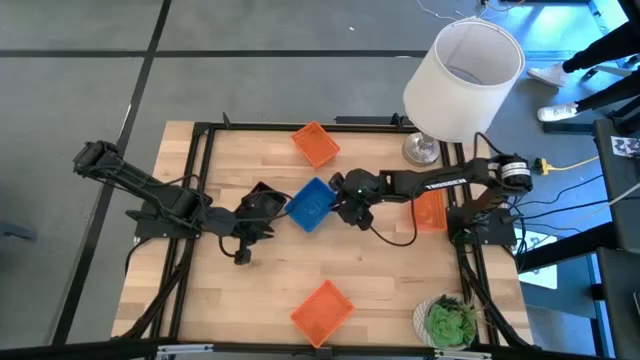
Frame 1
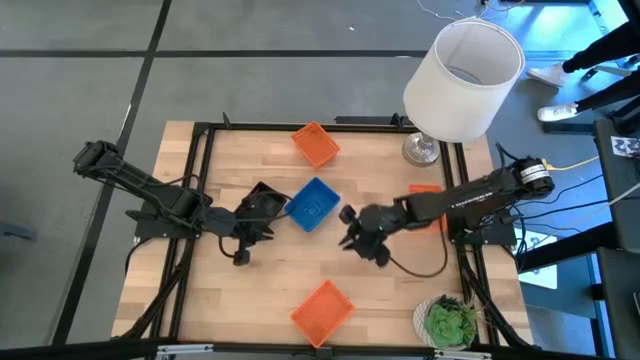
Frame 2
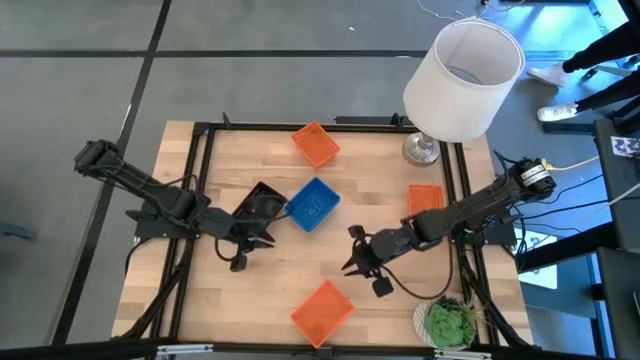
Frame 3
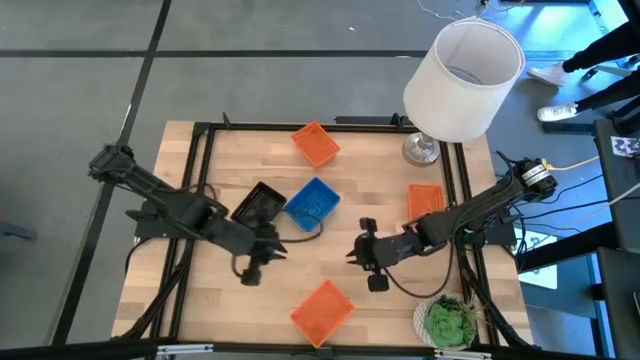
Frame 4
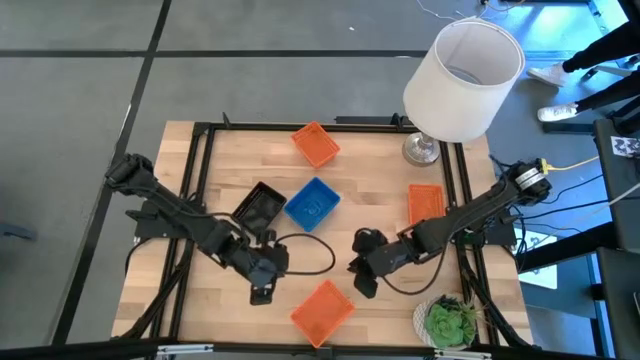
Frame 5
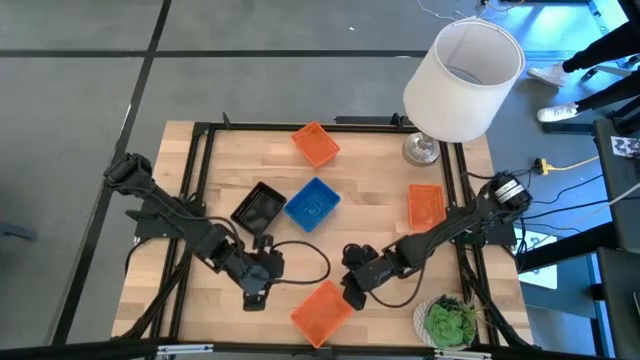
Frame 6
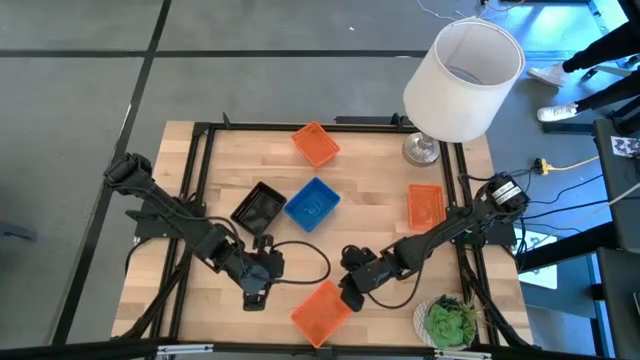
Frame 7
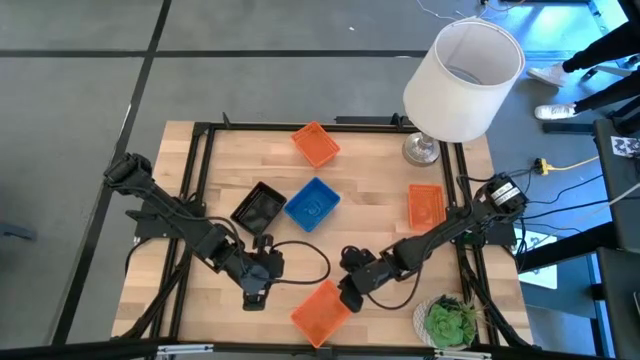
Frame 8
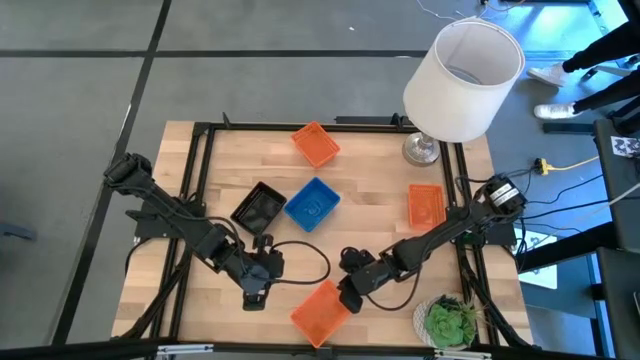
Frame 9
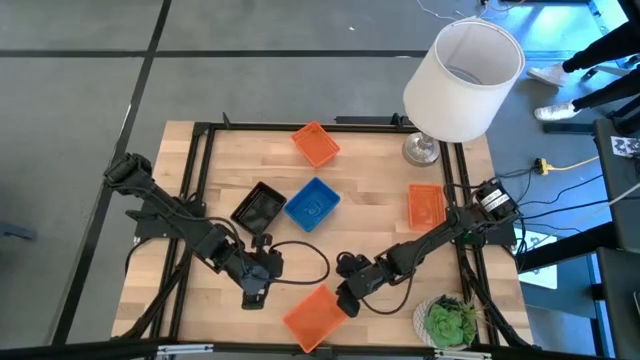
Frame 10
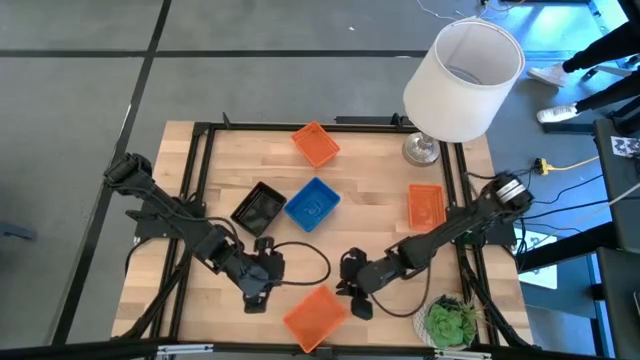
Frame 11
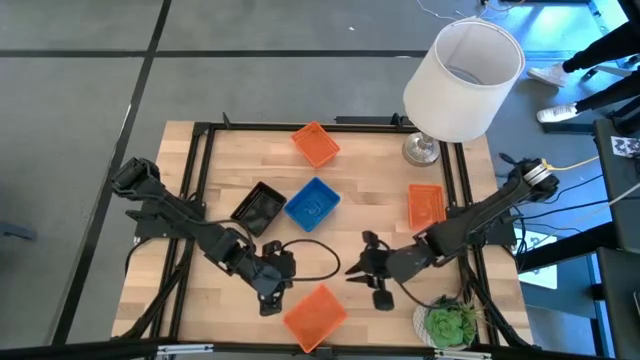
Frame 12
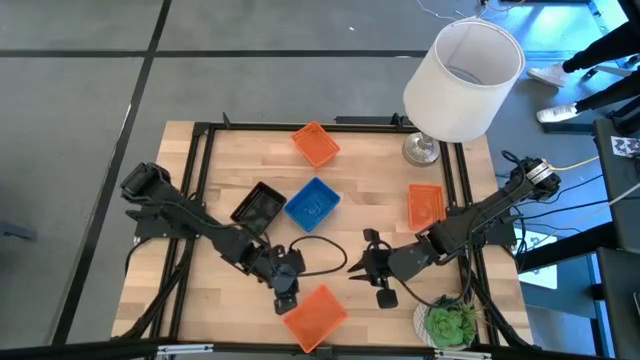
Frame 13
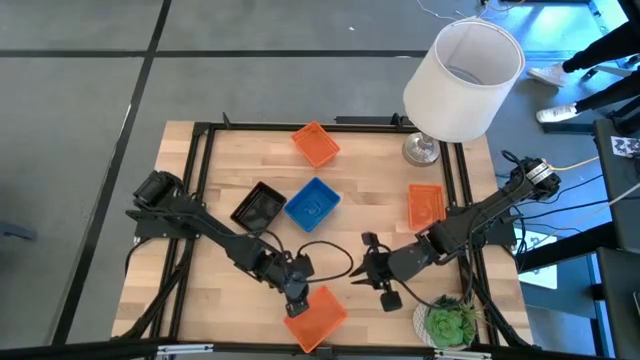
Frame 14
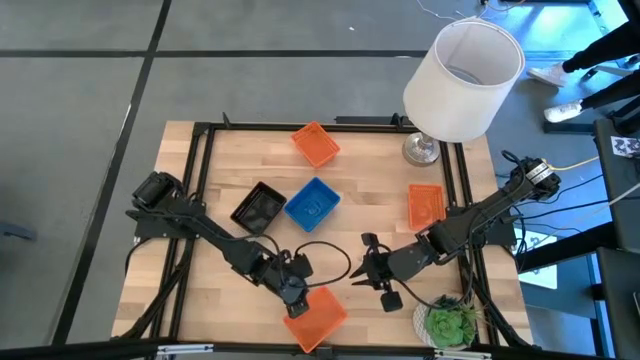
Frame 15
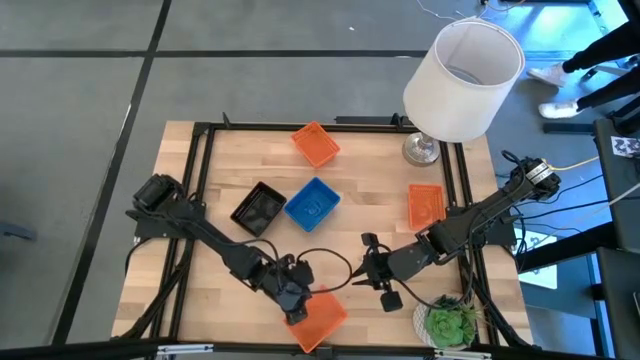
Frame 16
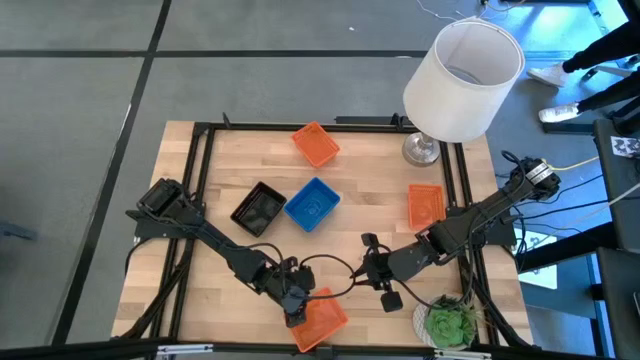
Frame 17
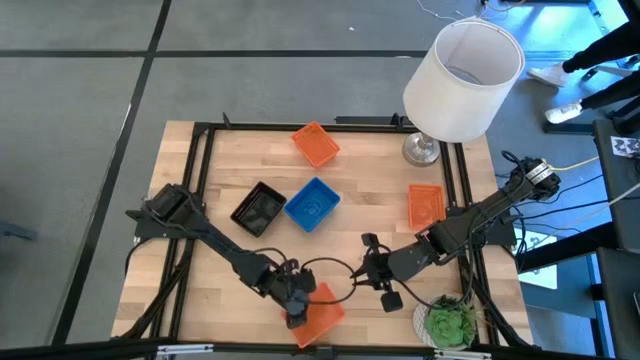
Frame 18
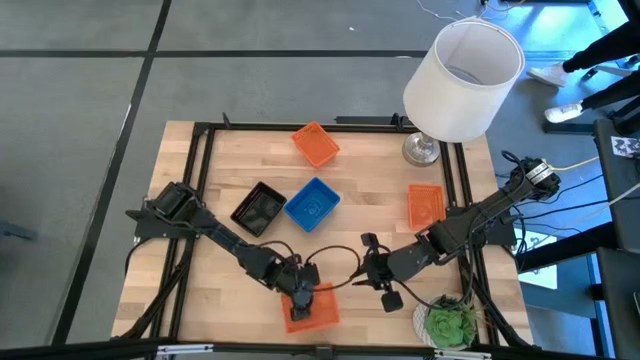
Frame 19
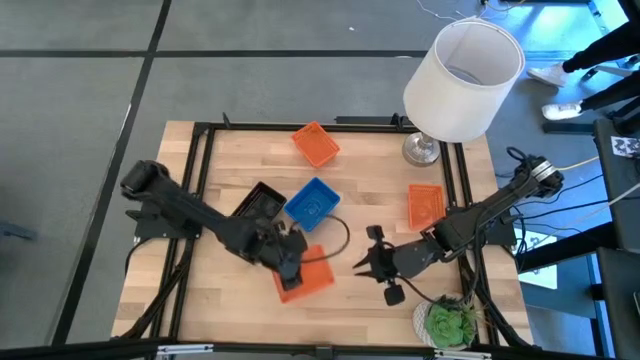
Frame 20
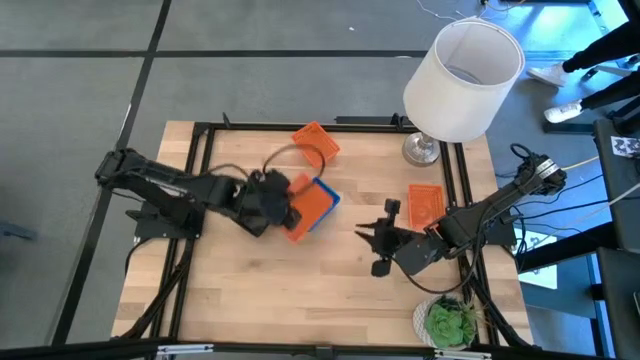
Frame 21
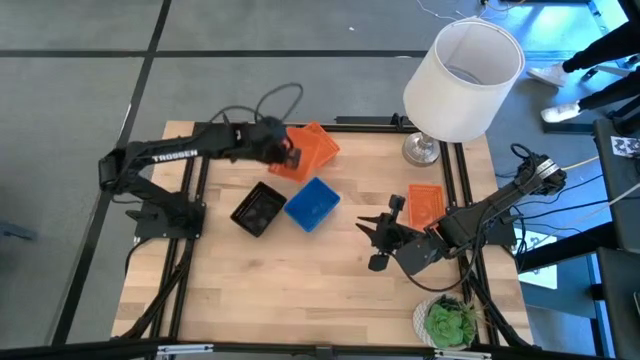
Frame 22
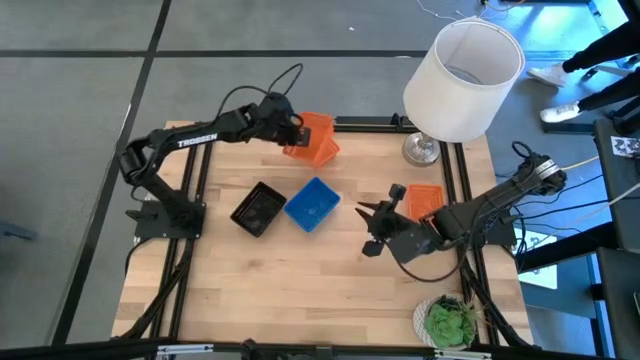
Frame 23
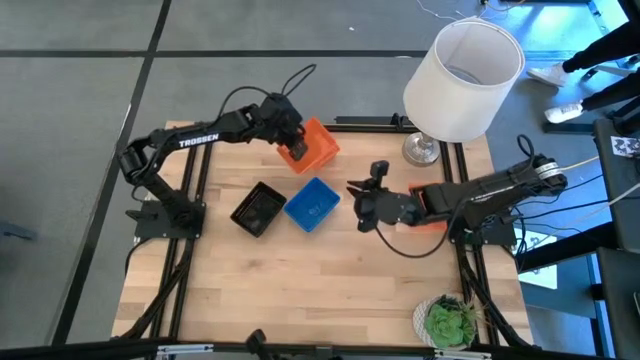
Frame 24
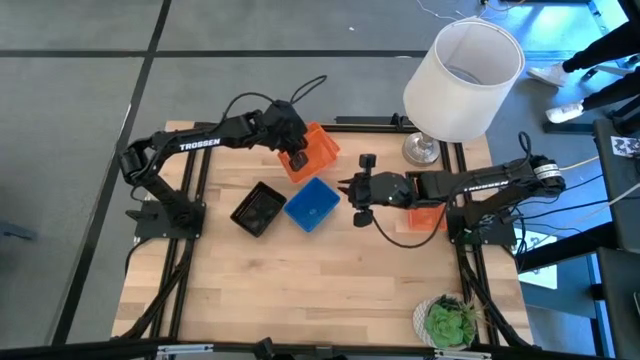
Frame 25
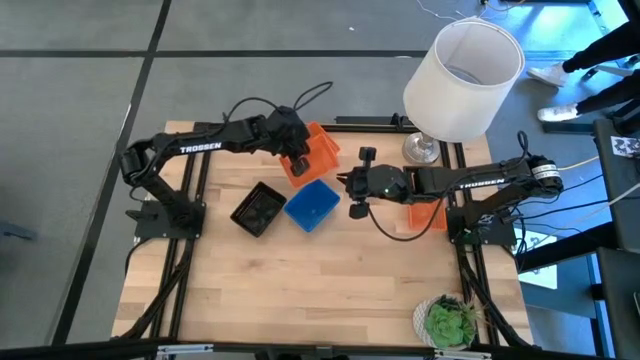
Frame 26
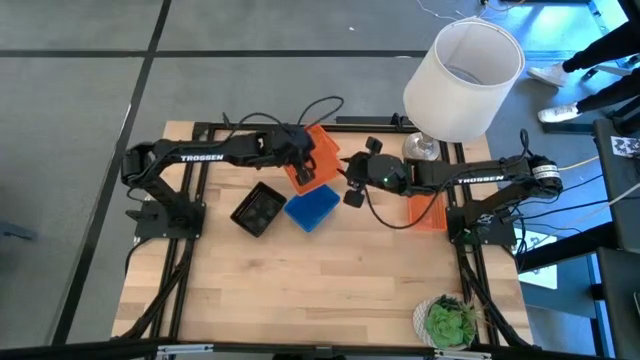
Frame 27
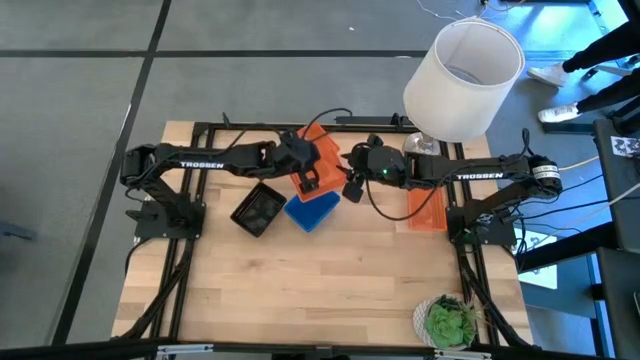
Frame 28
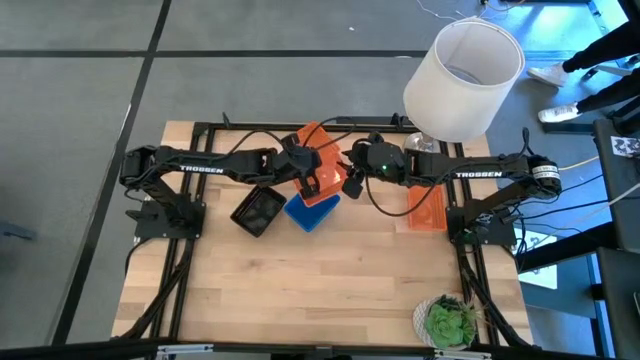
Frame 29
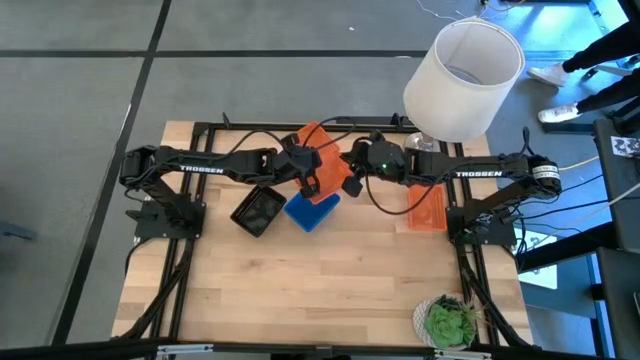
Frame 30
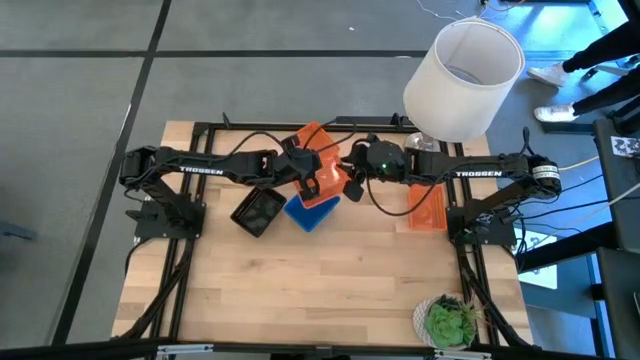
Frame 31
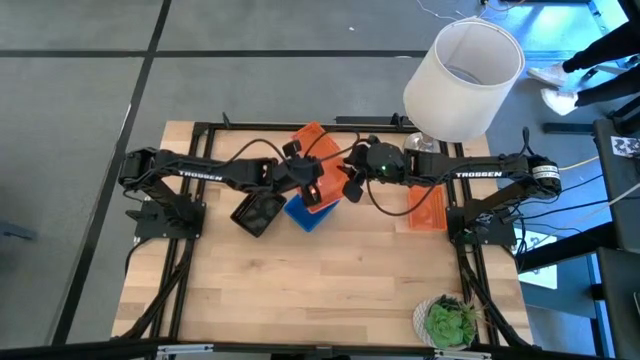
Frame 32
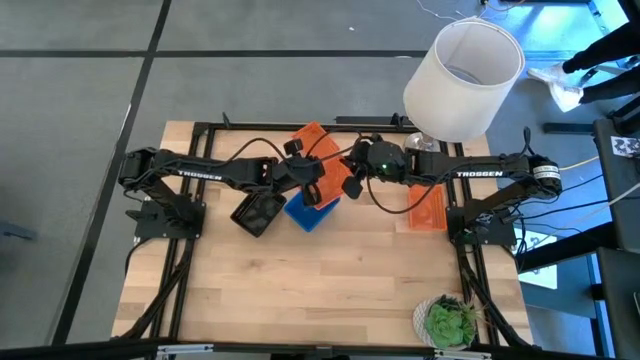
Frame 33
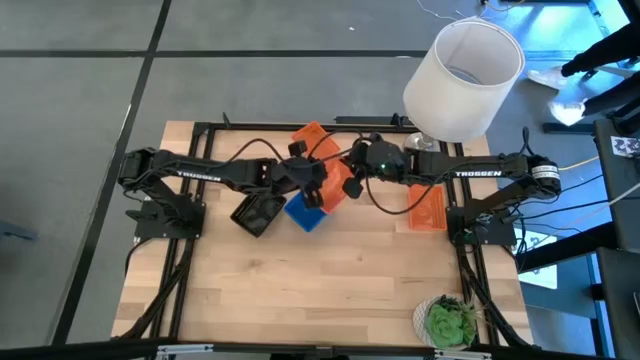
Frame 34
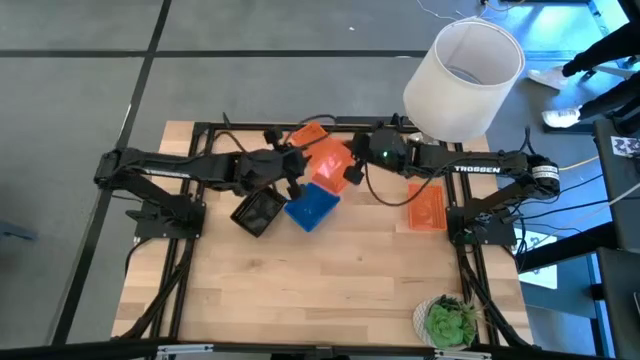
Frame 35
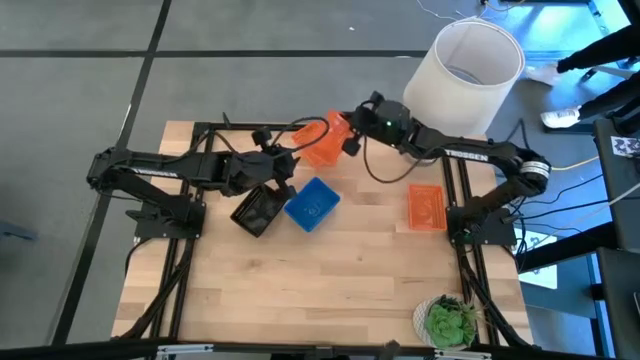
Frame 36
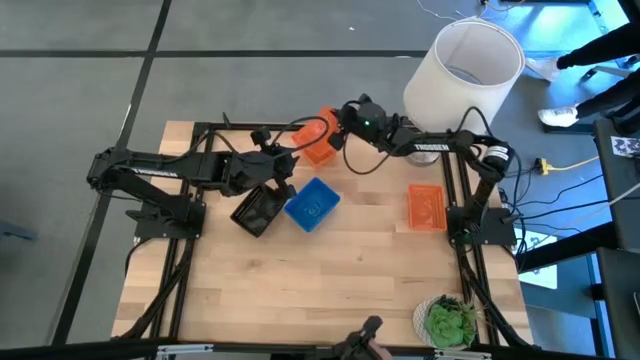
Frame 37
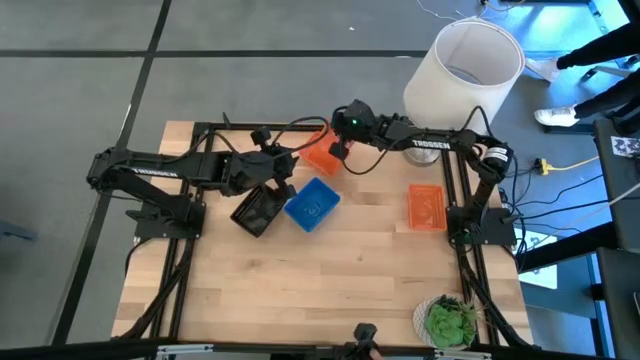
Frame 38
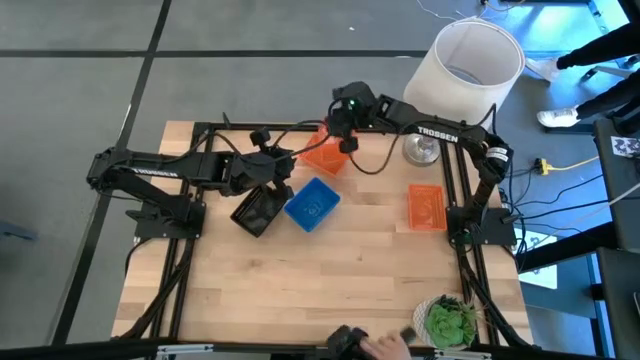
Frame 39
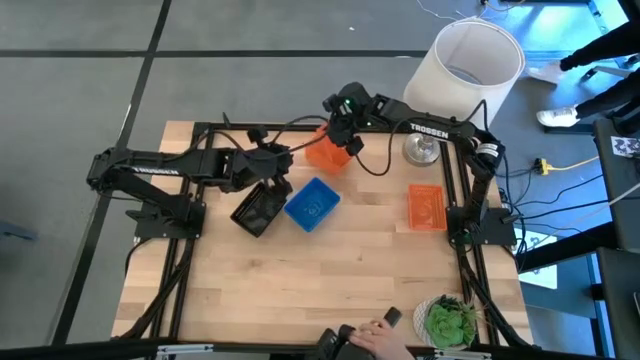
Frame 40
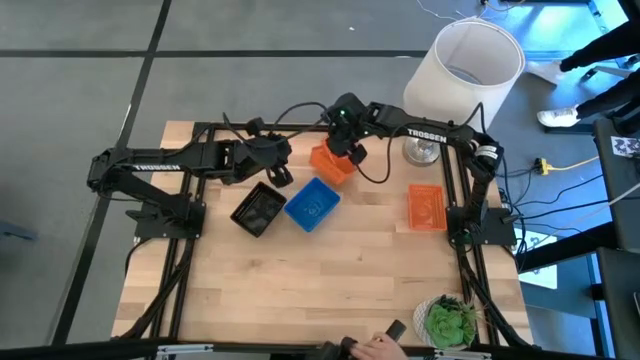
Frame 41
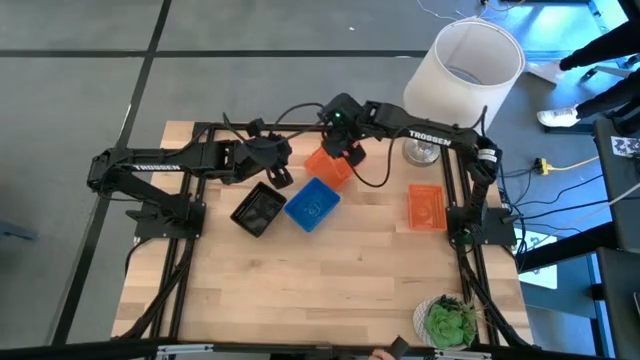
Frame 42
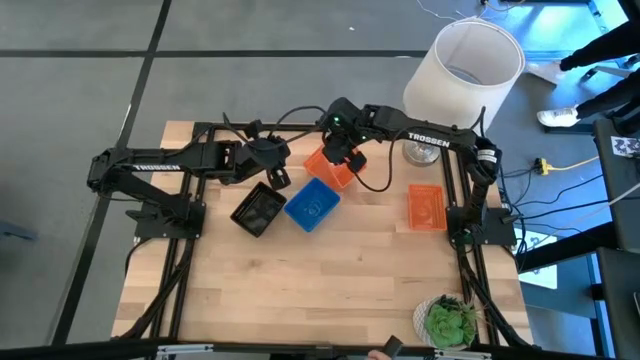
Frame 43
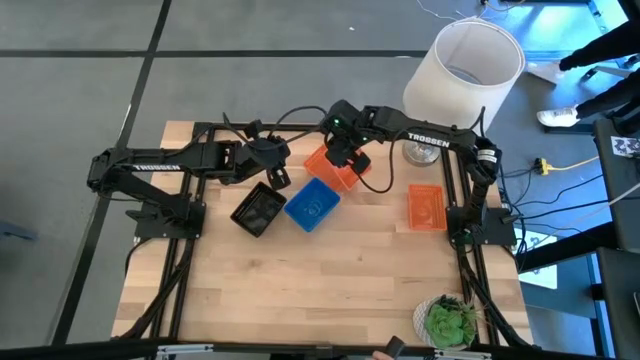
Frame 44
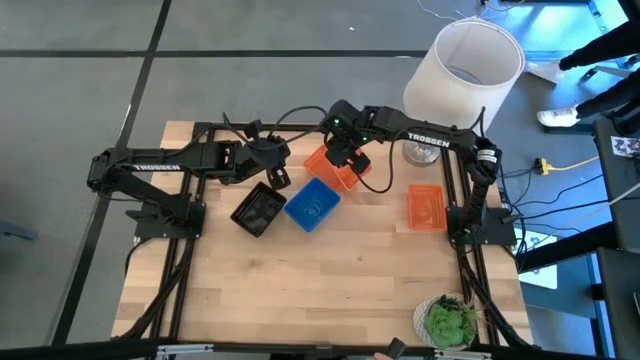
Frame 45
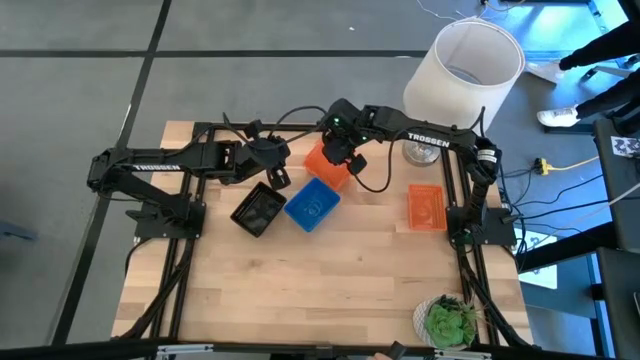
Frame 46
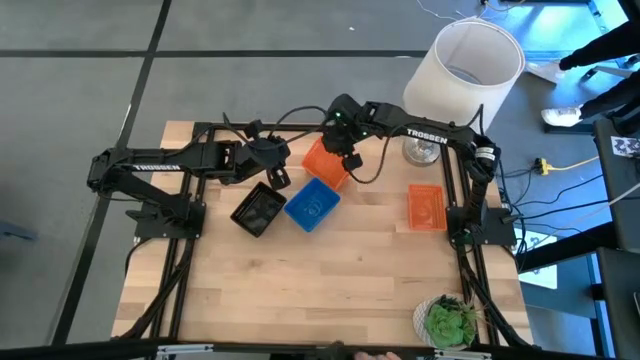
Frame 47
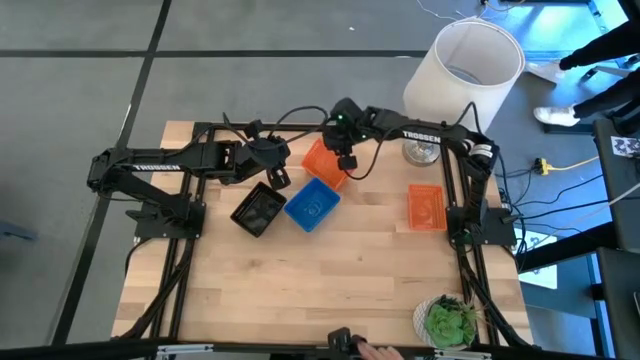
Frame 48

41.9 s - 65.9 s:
Stack the bottom orange bin on the top orange bin
